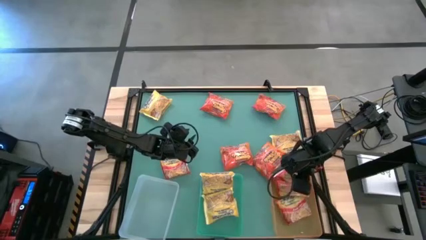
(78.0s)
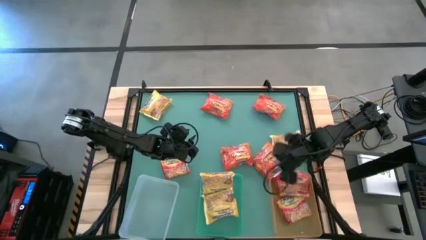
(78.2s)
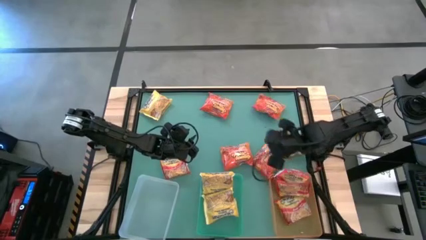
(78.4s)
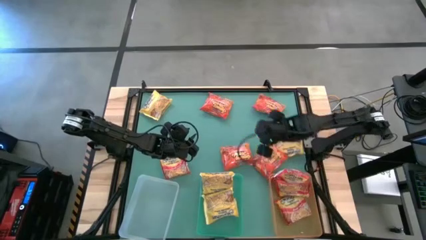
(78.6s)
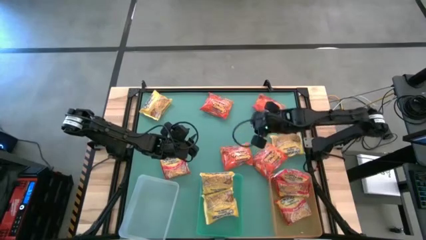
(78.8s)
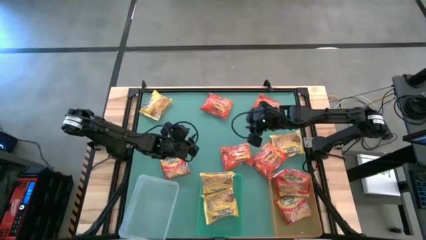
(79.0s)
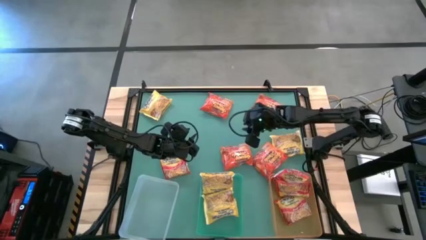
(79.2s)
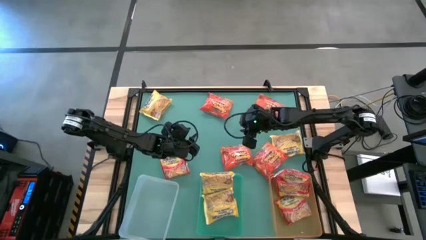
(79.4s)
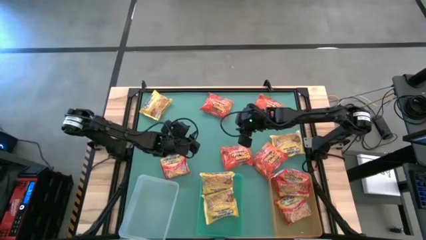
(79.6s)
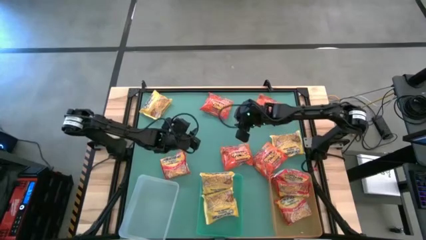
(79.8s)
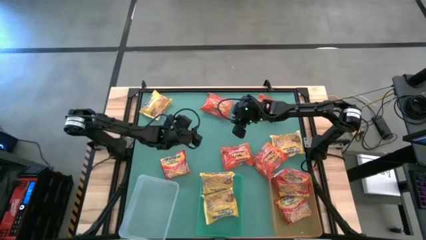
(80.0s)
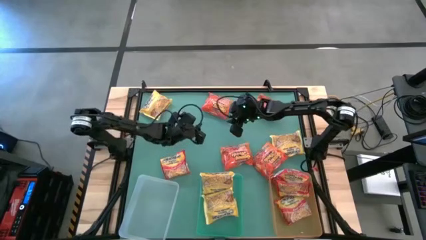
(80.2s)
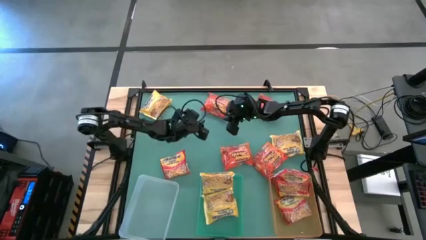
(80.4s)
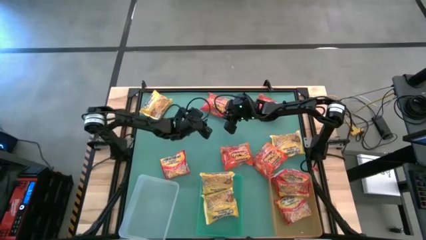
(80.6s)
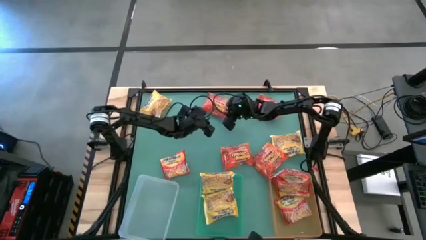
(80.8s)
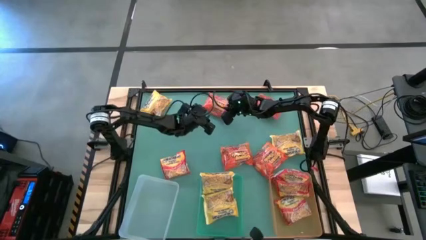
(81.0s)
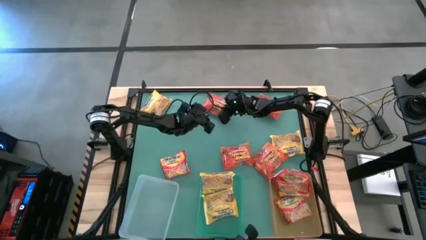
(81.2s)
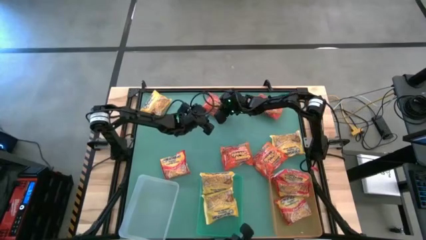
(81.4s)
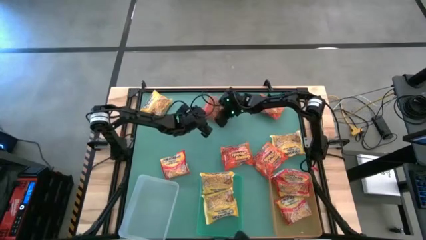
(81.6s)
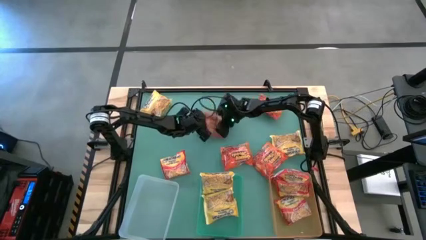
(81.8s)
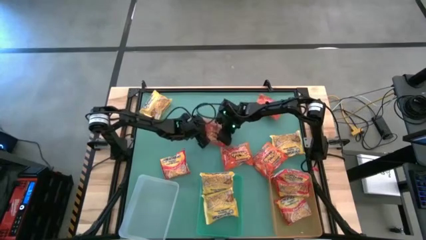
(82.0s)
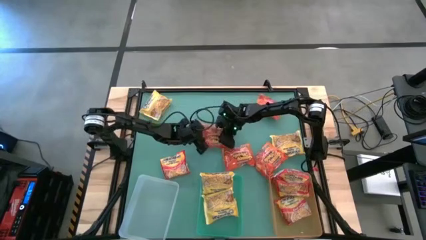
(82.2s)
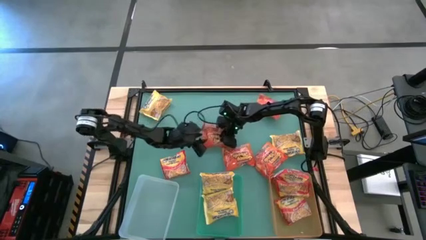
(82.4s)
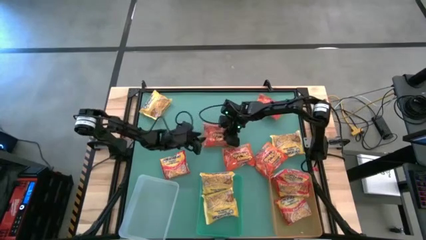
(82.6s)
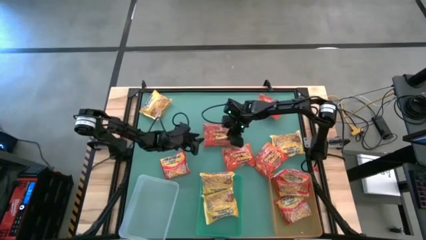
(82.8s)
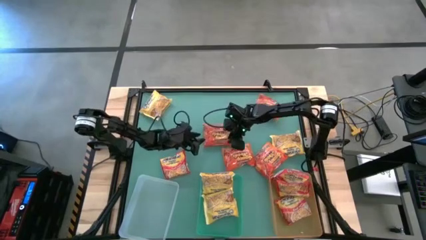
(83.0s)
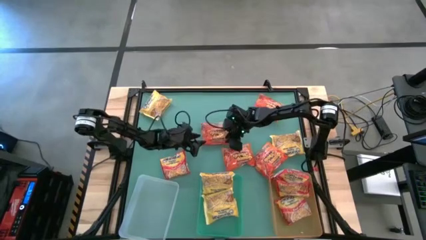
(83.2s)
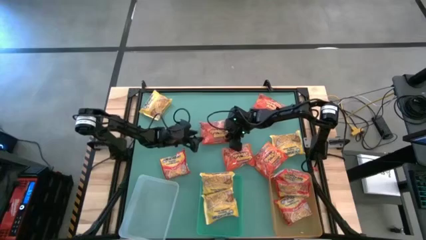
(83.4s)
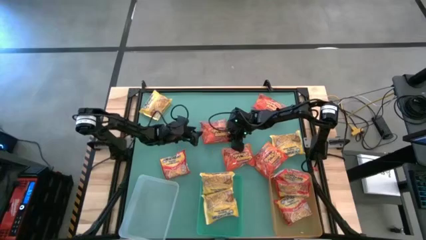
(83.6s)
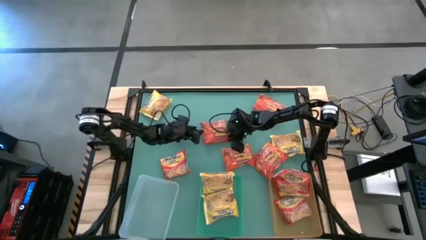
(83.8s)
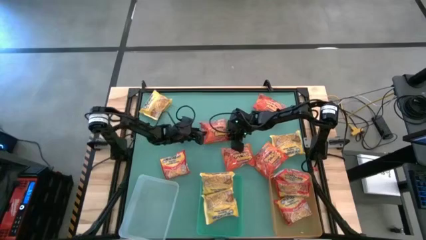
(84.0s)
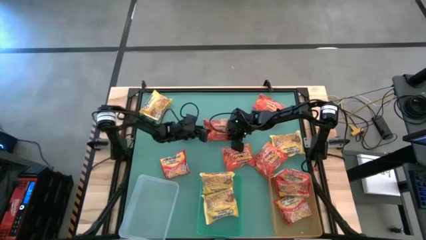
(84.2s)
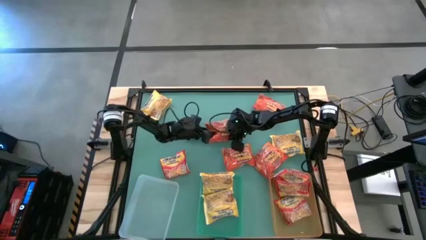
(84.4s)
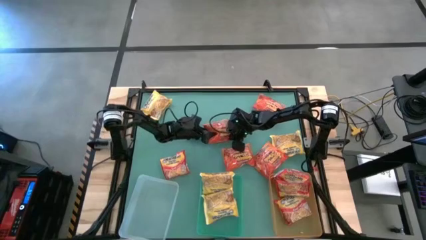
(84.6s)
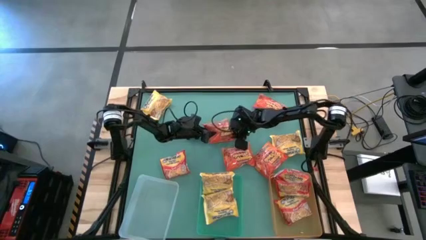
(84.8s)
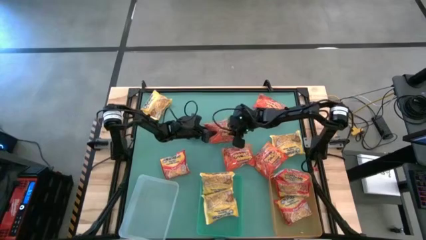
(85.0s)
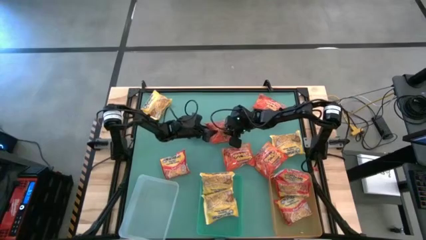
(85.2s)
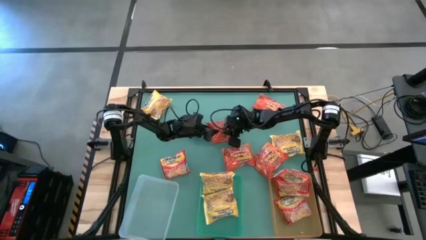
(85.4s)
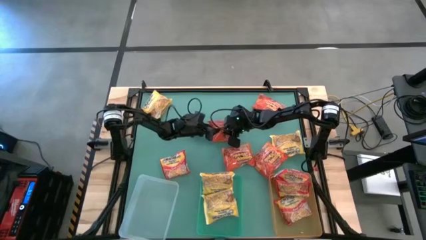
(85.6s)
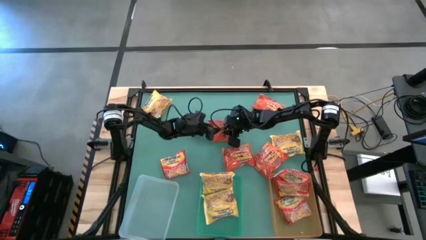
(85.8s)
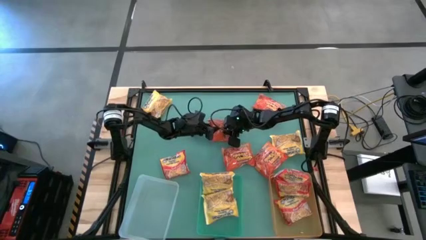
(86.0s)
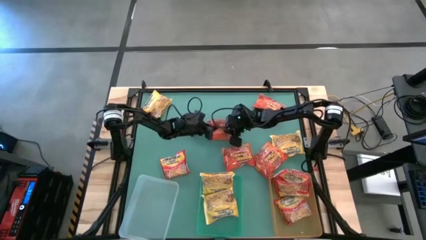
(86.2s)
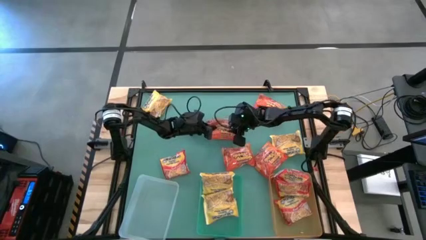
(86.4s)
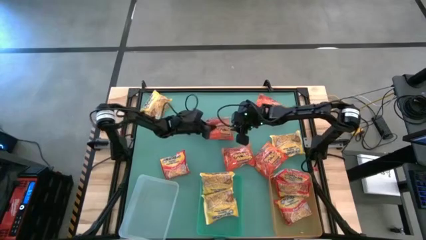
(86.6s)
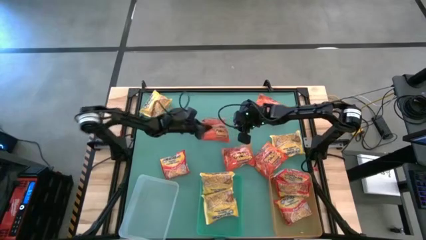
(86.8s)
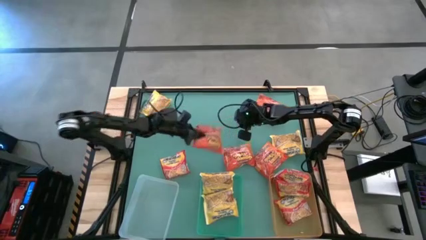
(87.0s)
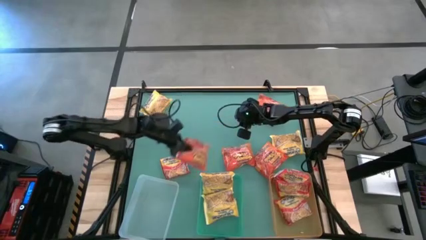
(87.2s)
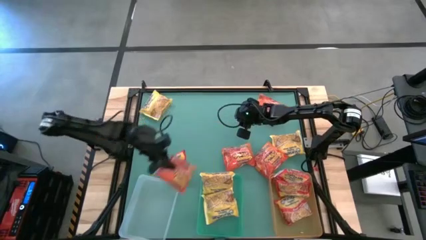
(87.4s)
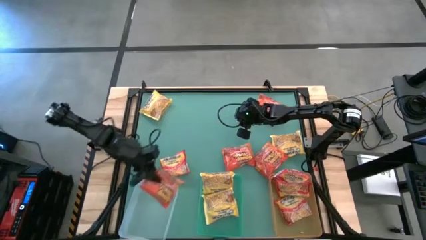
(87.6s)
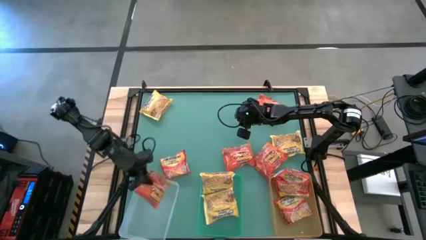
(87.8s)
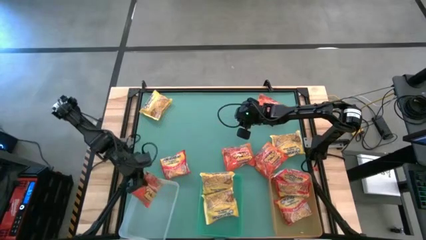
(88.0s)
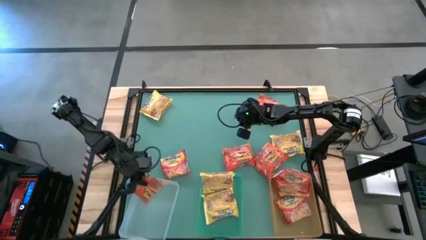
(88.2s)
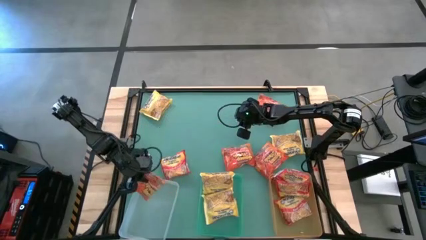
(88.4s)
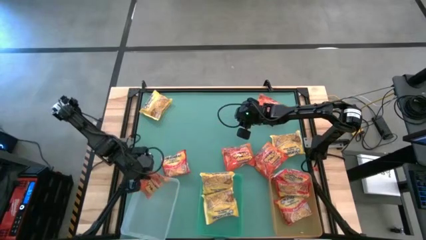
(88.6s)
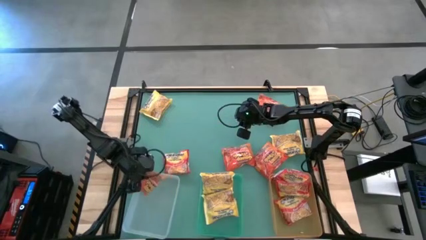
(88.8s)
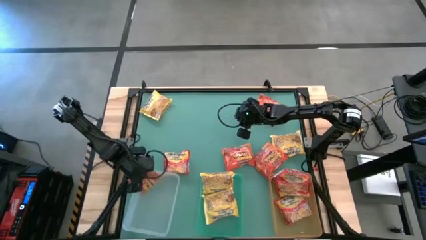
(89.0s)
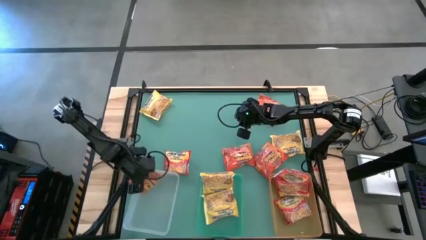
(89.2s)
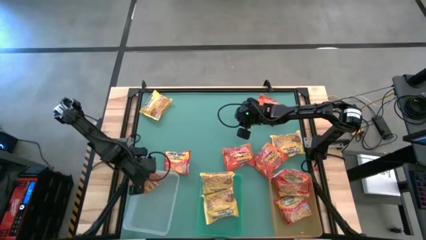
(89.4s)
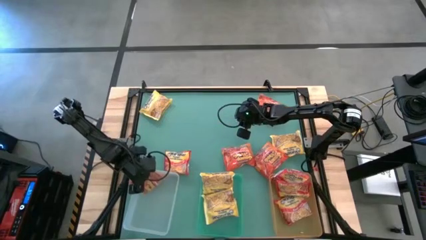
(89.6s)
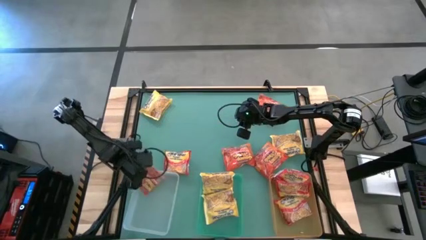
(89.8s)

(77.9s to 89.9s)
Task: Sort Maruchan noodles
Put the orange noodle pack into the white bin
